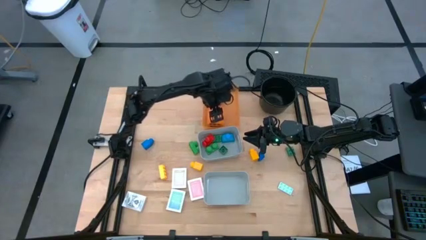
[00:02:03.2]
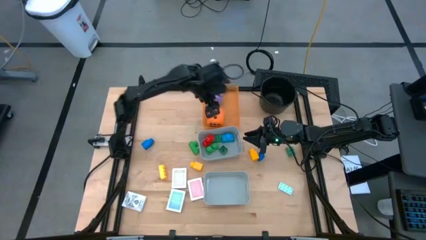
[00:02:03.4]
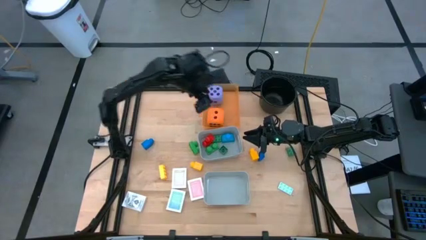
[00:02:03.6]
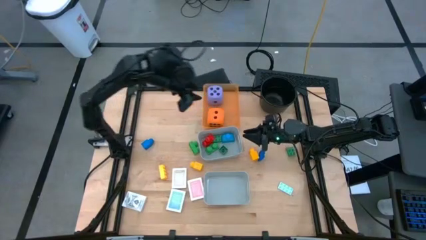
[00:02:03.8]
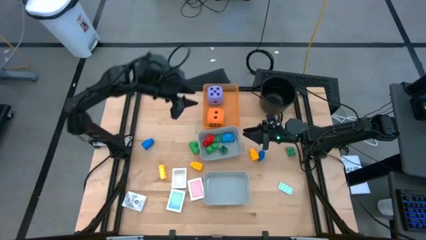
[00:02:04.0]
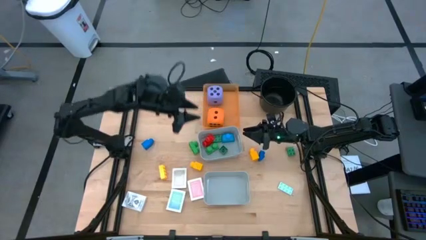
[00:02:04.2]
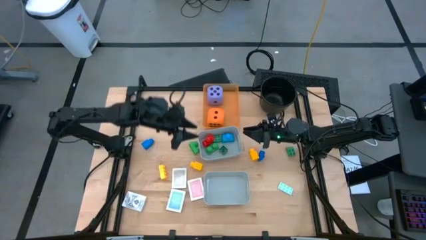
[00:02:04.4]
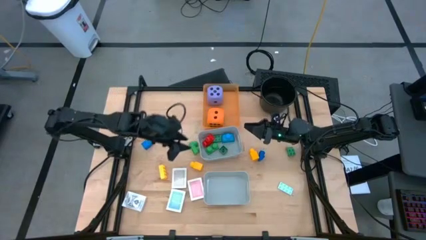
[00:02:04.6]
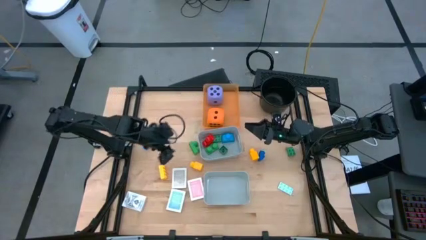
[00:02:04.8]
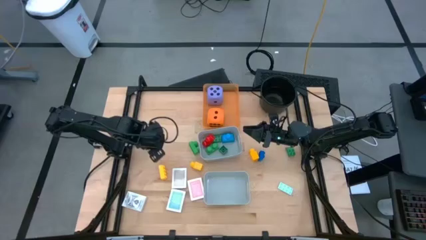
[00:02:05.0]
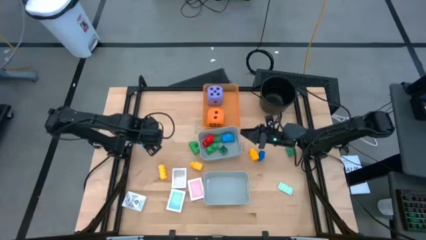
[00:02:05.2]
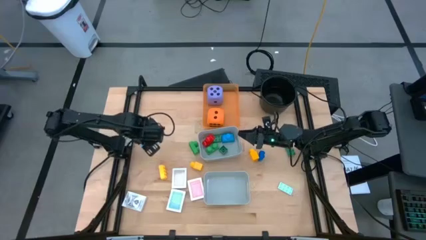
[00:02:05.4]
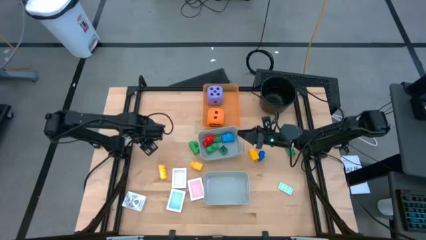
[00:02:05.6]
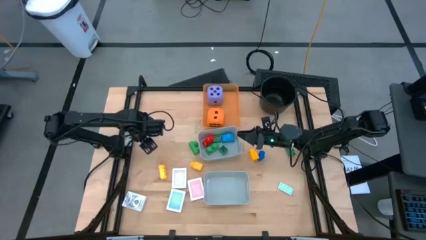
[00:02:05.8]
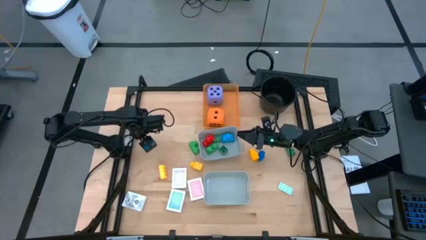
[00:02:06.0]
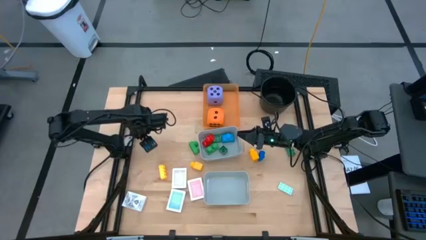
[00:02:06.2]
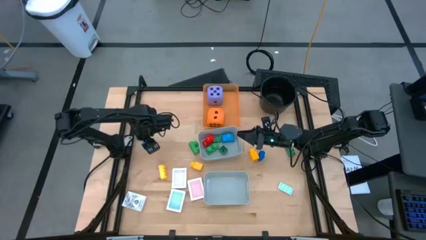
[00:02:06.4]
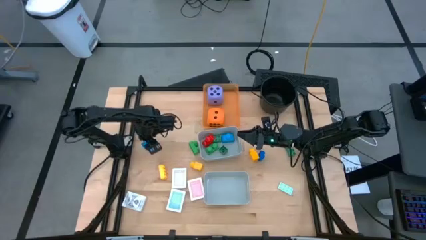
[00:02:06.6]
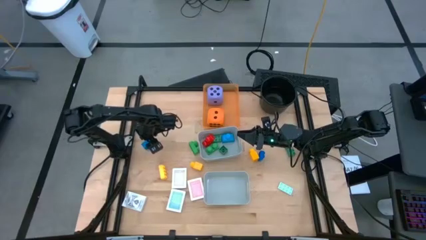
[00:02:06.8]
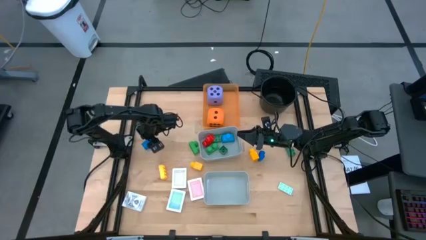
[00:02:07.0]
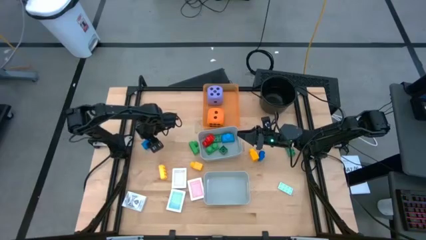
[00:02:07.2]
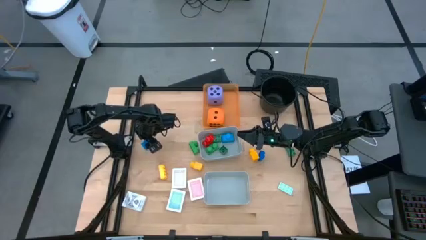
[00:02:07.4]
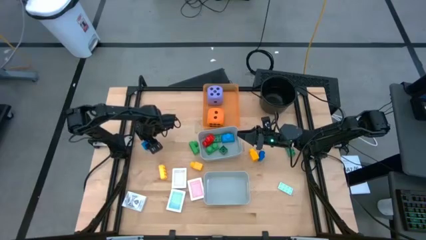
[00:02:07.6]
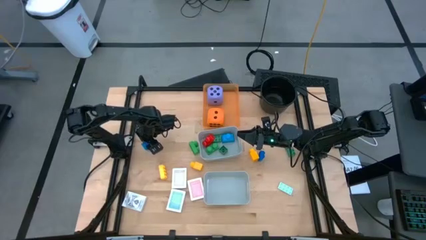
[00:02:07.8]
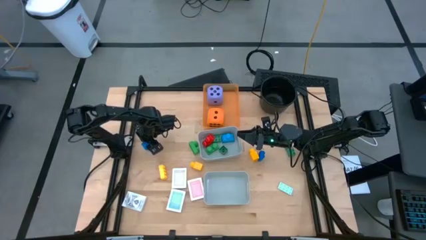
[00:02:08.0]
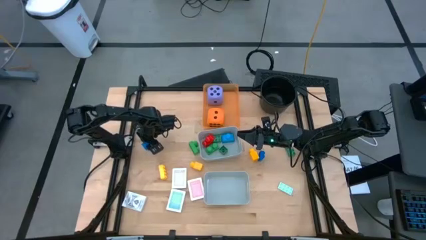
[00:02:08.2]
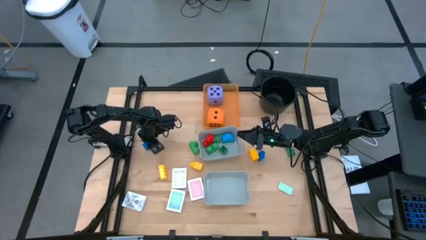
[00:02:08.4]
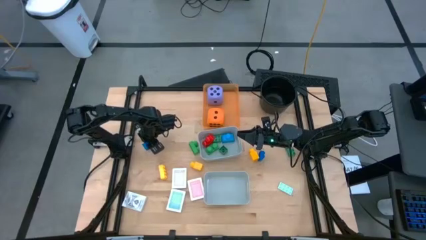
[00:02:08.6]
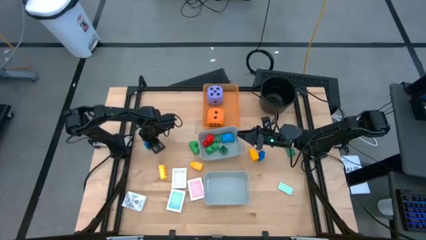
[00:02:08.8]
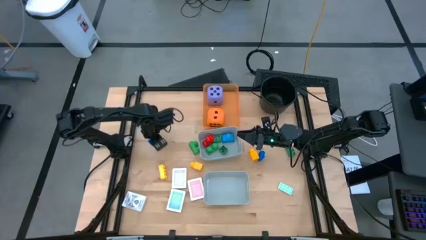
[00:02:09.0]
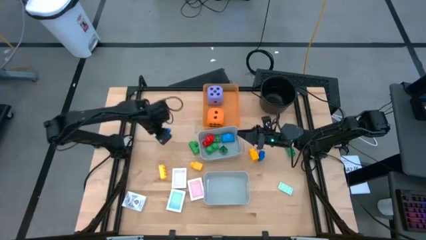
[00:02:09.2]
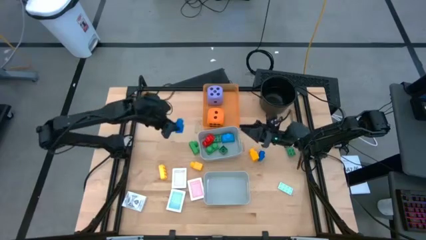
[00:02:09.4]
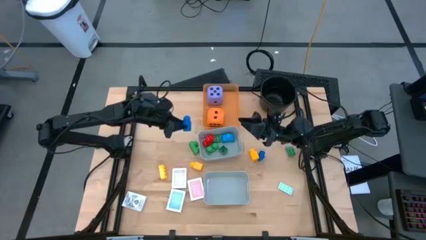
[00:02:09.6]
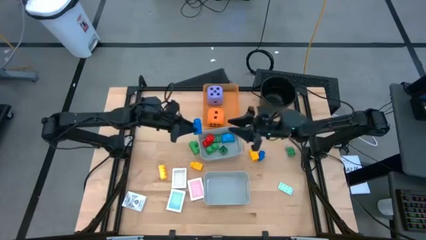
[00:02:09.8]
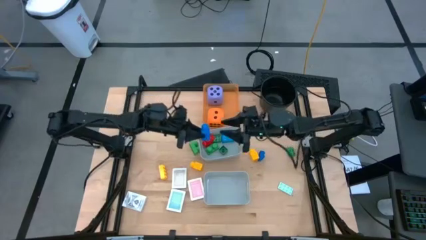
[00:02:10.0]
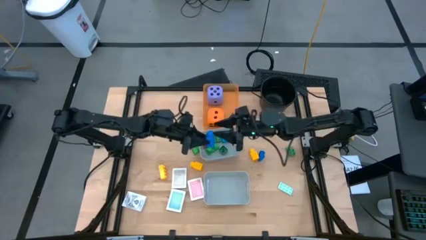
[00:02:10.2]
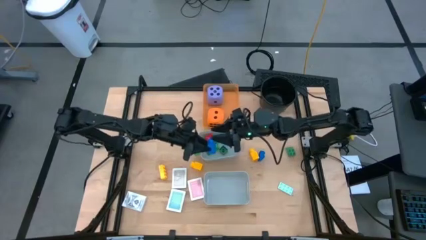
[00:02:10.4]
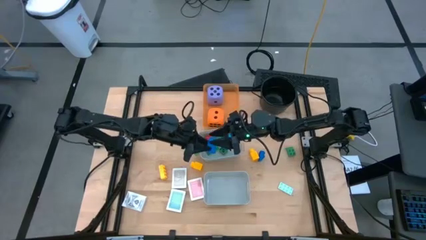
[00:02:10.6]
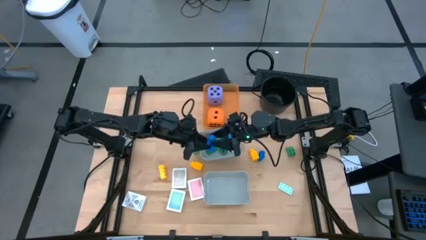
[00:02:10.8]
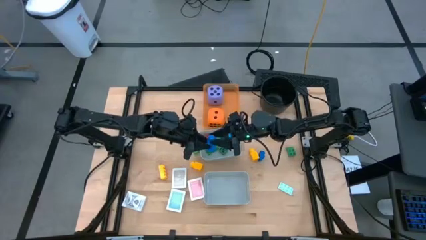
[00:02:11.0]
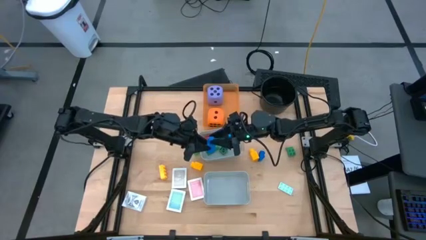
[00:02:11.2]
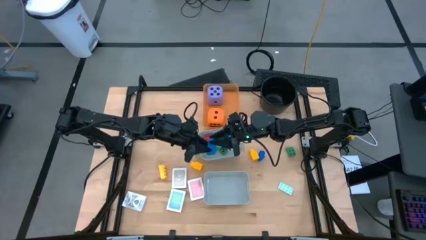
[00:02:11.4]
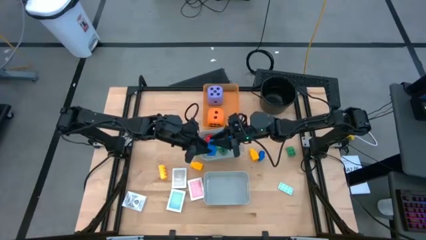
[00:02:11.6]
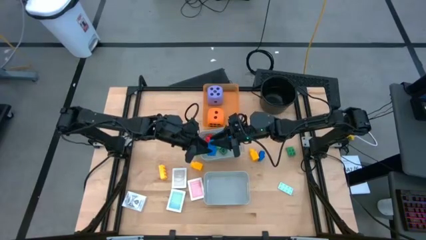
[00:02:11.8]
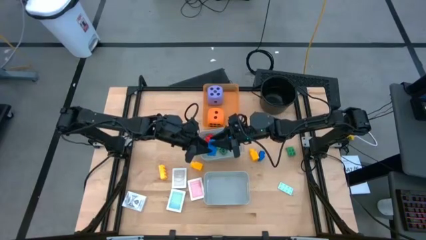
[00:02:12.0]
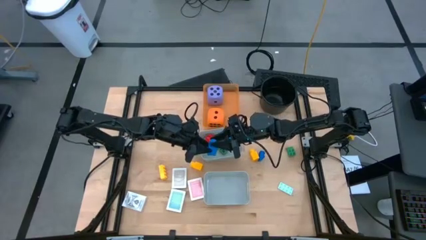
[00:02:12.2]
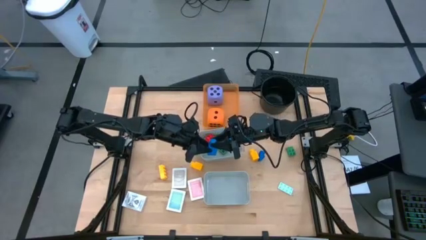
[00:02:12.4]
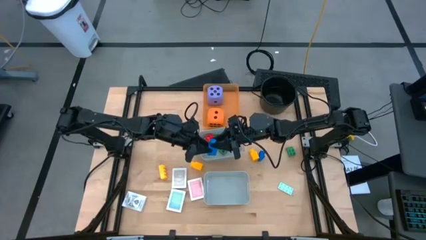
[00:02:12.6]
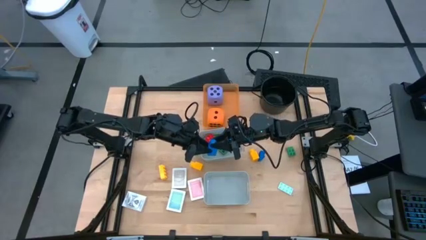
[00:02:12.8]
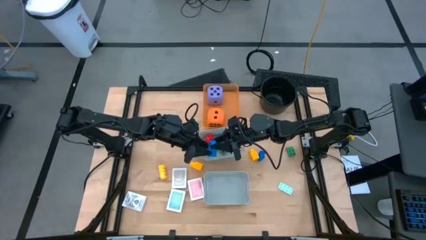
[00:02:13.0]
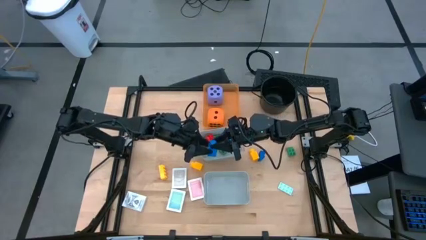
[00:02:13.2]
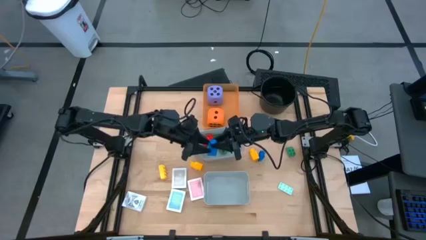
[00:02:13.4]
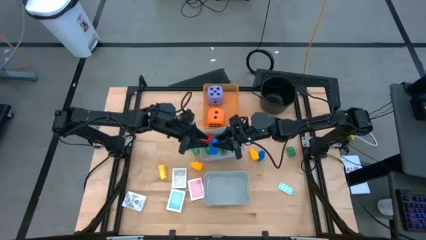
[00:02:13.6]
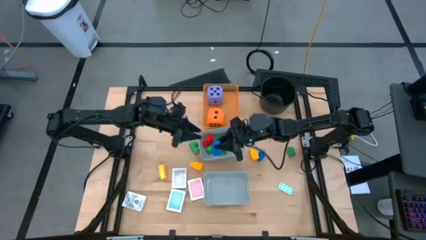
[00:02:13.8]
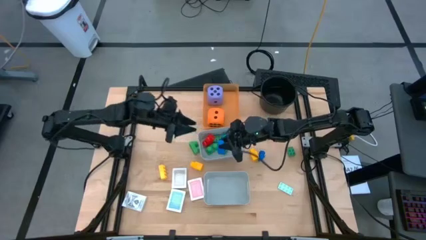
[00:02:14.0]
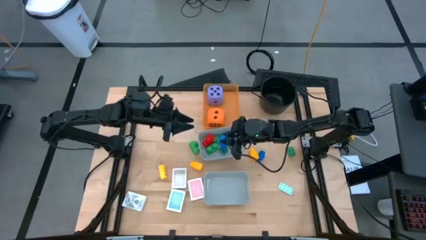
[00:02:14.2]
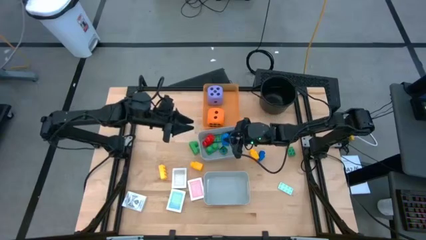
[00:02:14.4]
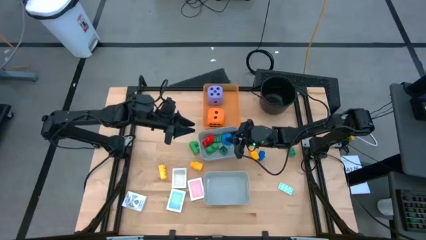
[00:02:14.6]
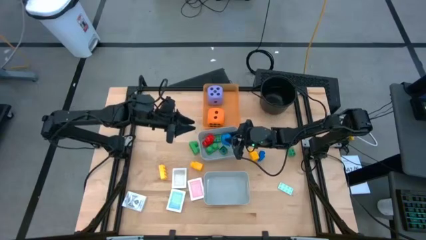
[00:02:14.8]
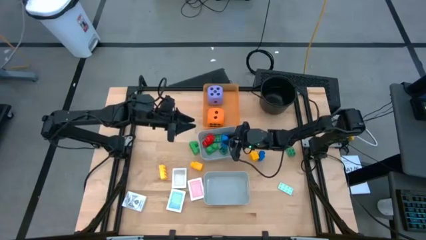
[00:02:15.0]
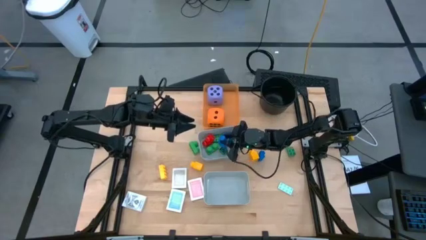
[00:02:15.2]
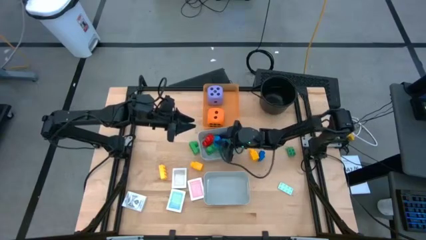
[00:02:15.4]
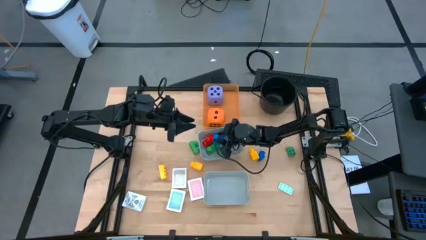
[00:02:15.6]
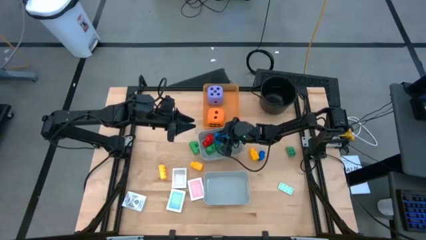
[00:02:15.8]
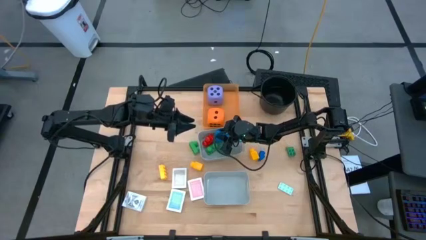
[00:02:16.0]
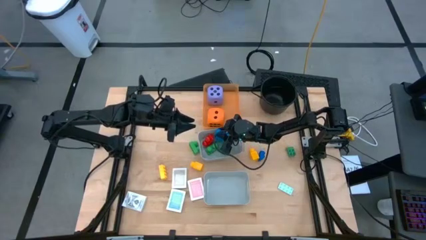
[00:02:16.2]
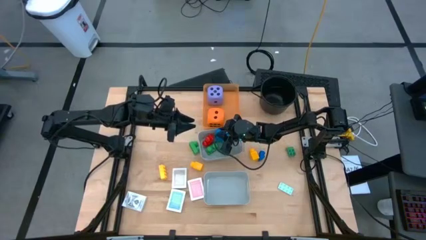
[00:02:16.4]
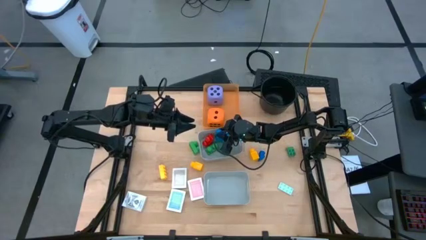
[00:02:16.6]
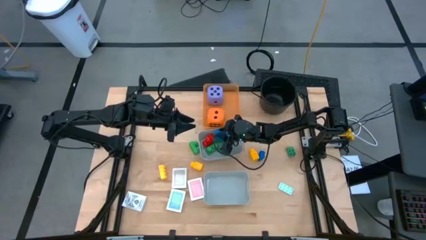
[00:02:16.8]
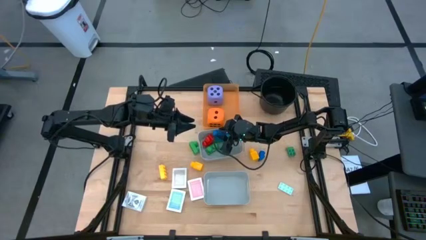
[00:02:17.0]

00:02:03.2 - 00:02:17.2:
Task: Pick & Place Toys
Put the left blue game piece into the top gray bin

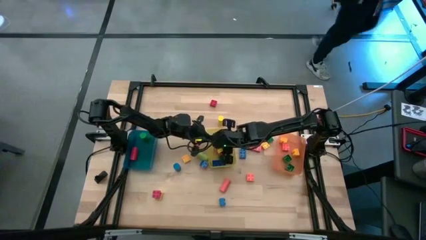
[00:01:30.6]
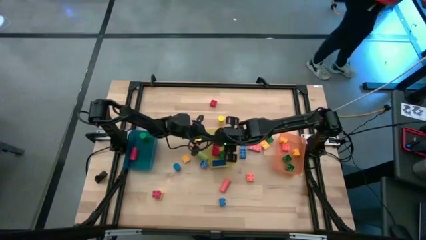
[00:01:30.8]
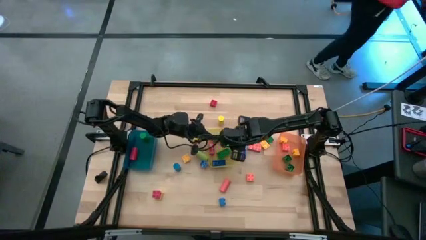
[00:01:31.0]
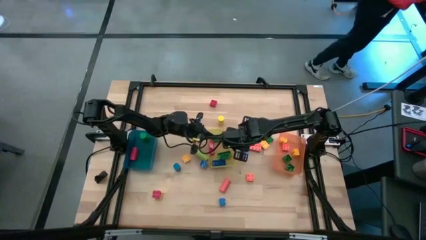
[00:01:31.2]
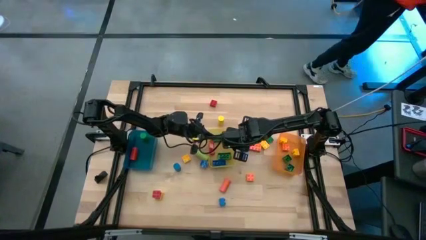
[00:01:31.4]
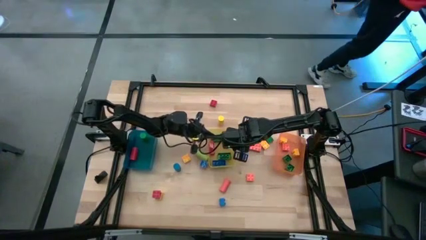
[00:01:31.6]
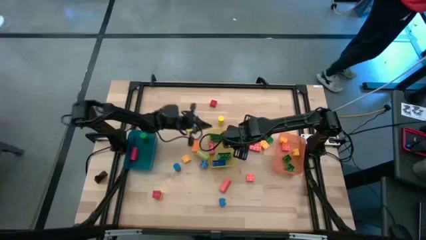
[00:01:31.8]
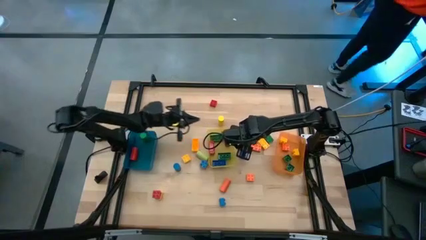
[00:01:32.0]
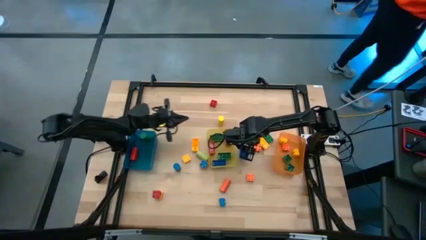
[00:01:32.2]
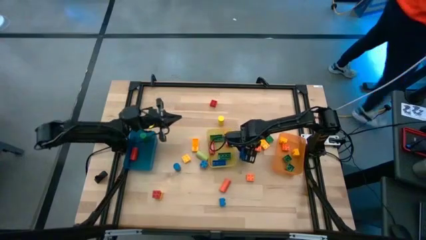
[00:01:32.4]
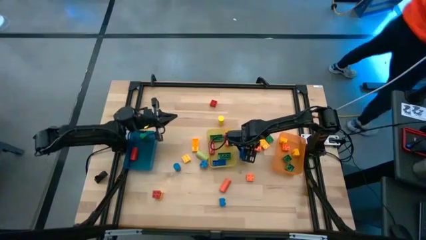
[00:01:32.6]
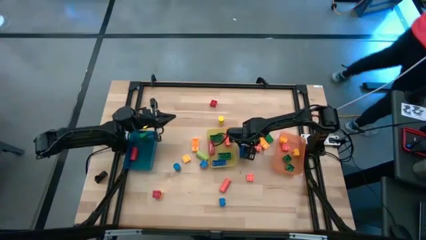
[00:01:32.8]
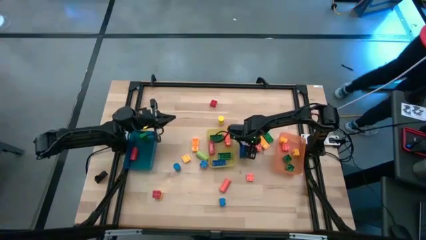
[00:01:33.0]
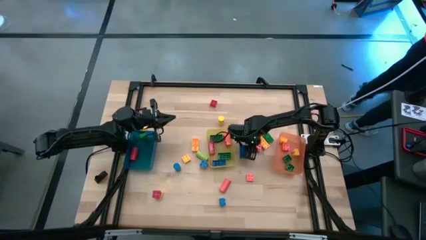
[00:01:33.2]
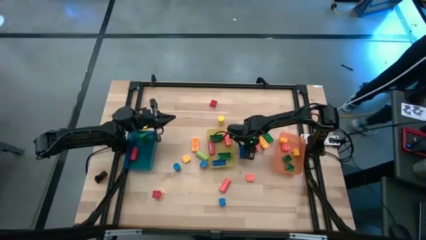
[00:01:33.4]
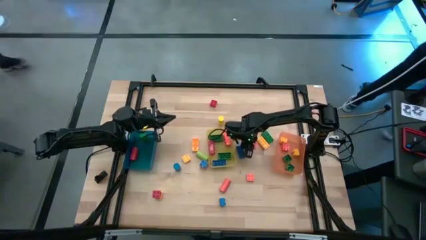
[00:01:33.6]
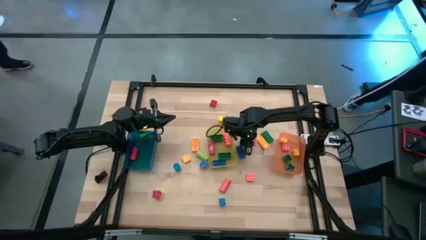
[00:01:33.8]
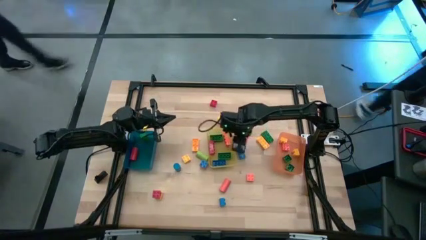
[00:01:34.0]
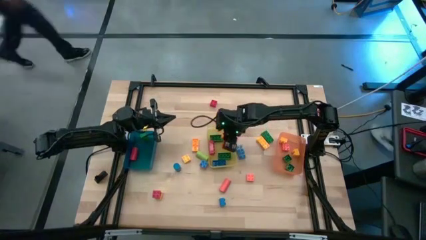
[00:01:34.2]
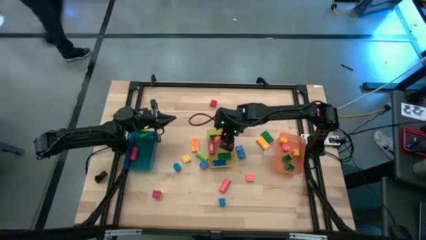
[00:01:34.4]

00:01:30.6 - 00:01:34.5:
Task: Sort blocks by size
Put the orange 8 stud game piece into the yellow bin
